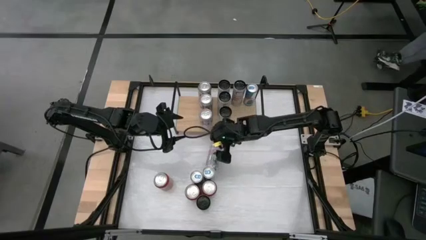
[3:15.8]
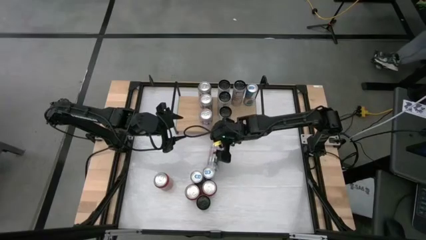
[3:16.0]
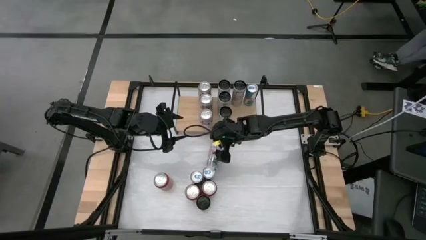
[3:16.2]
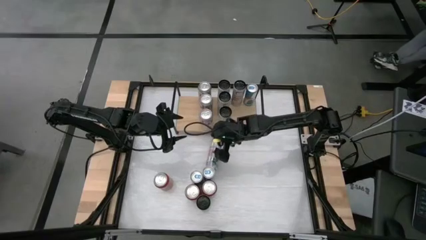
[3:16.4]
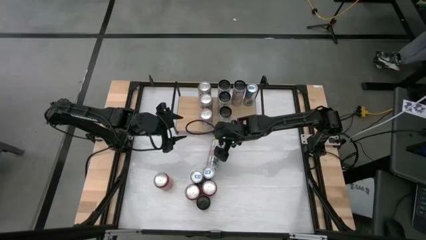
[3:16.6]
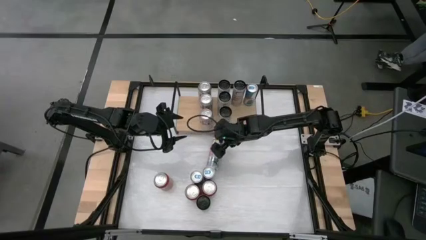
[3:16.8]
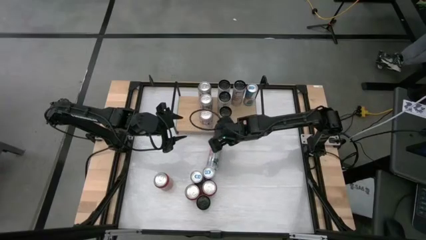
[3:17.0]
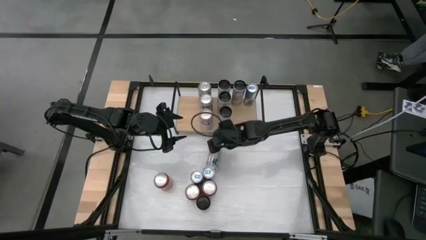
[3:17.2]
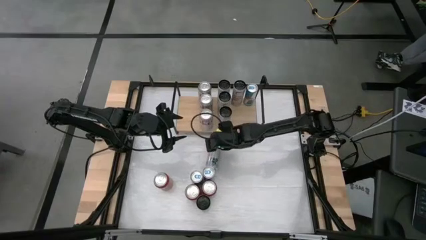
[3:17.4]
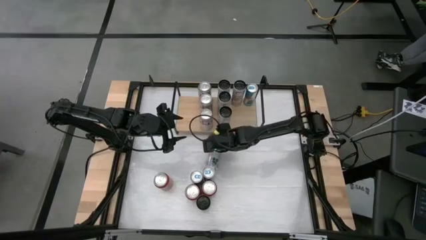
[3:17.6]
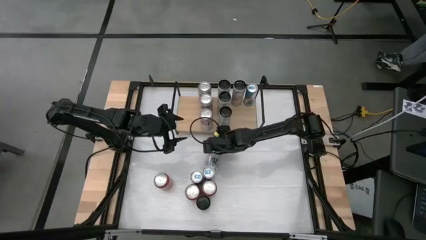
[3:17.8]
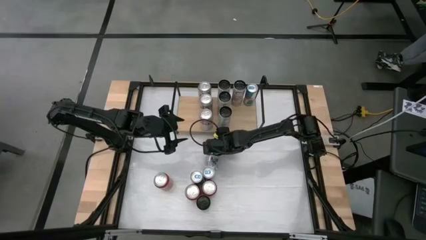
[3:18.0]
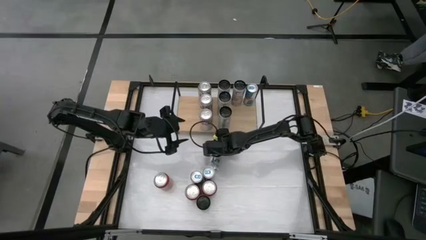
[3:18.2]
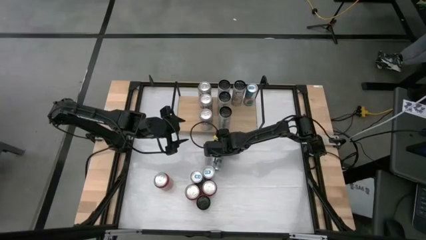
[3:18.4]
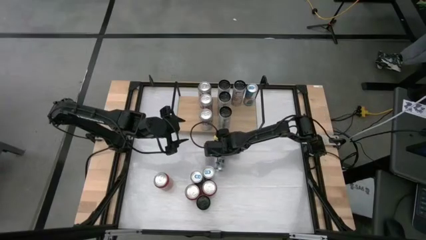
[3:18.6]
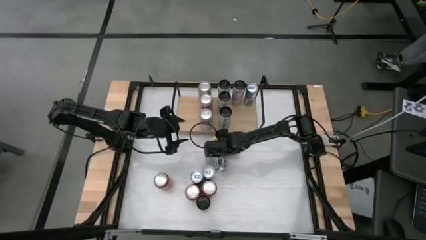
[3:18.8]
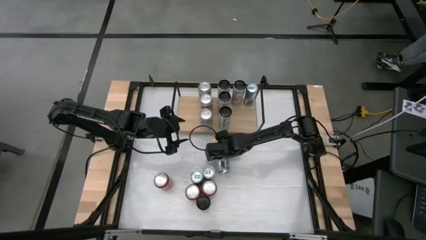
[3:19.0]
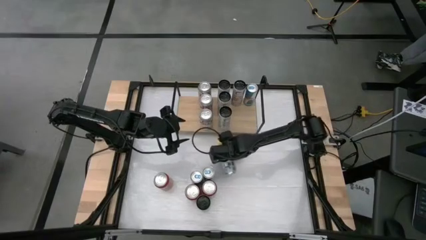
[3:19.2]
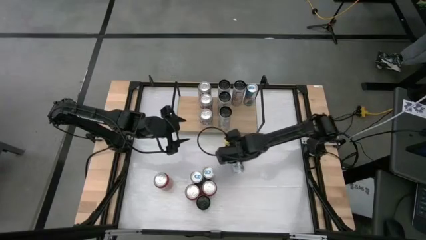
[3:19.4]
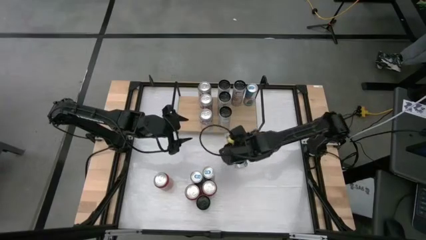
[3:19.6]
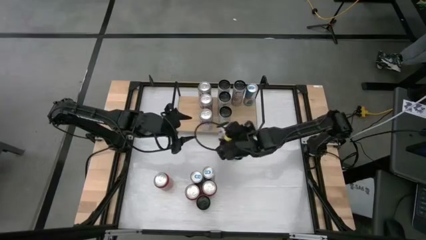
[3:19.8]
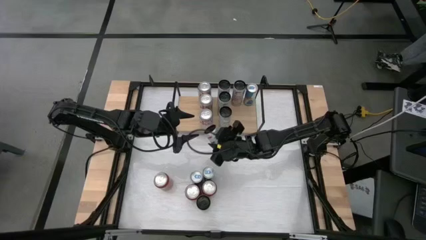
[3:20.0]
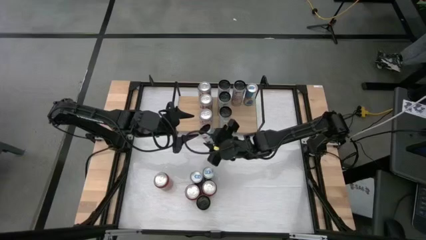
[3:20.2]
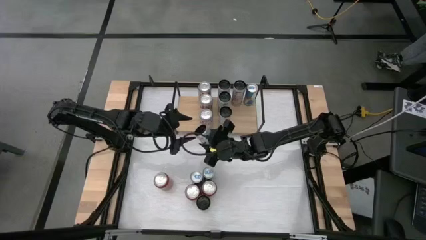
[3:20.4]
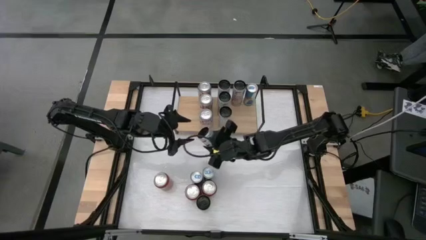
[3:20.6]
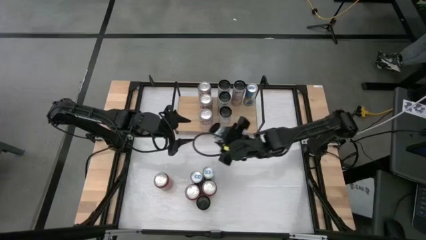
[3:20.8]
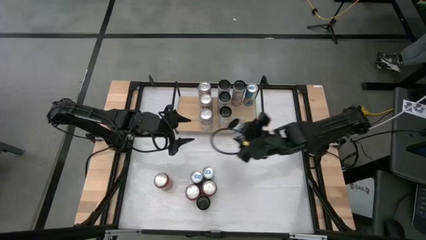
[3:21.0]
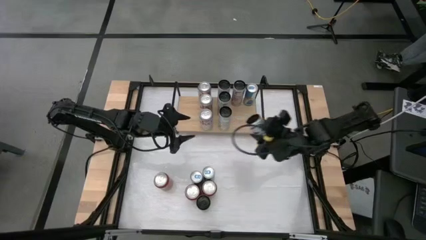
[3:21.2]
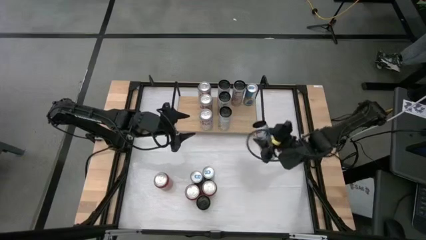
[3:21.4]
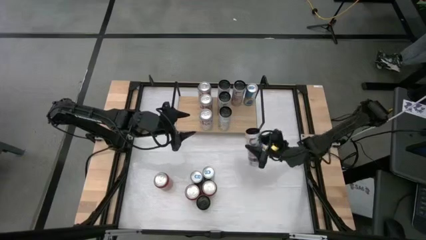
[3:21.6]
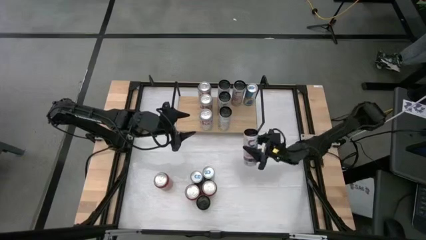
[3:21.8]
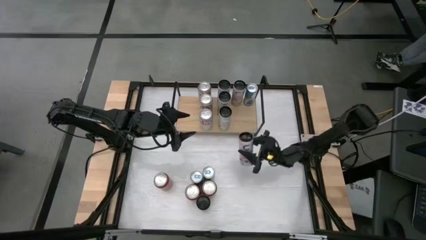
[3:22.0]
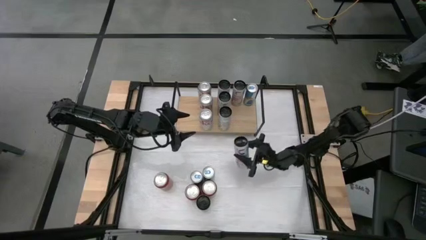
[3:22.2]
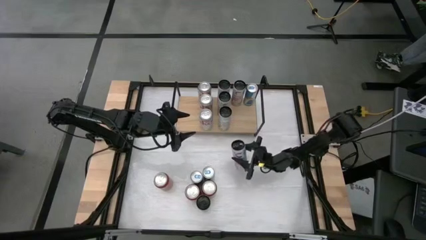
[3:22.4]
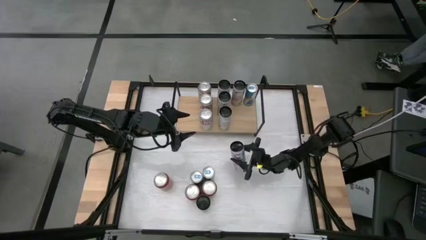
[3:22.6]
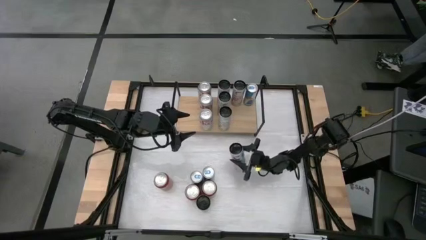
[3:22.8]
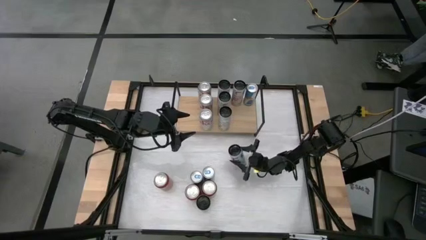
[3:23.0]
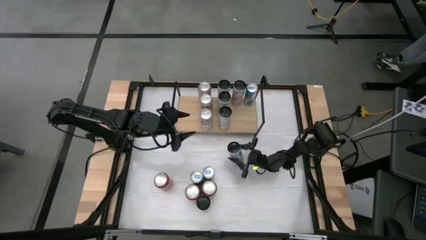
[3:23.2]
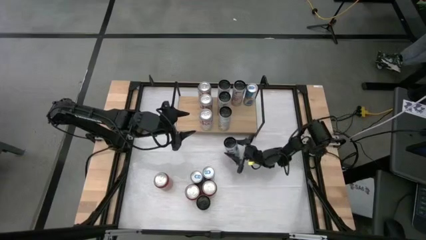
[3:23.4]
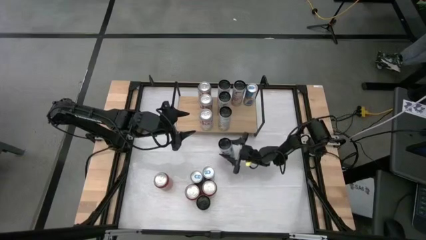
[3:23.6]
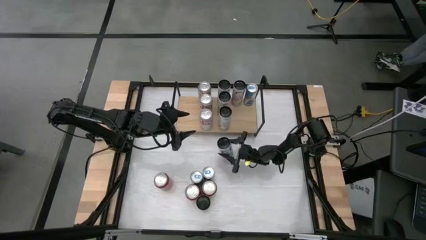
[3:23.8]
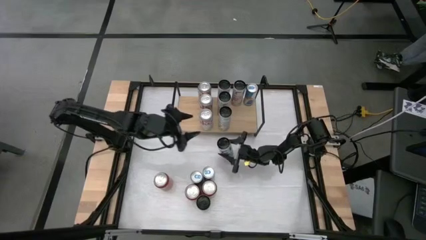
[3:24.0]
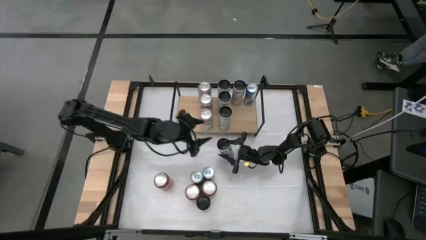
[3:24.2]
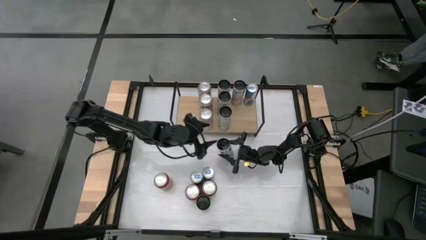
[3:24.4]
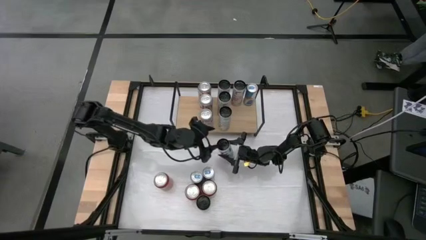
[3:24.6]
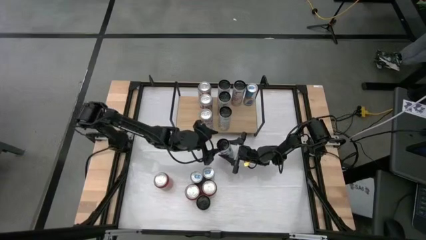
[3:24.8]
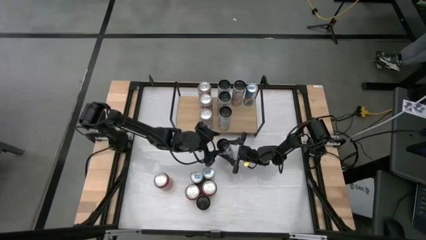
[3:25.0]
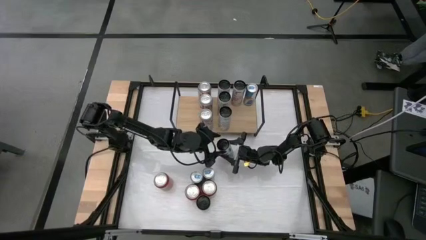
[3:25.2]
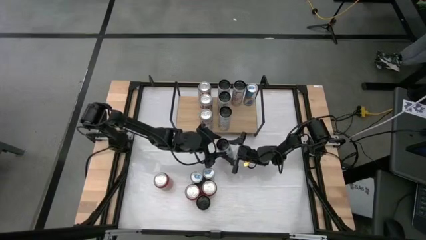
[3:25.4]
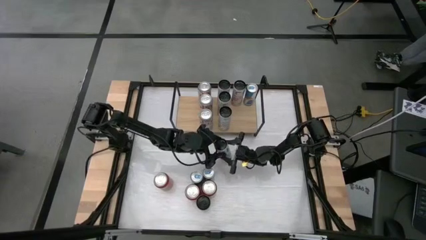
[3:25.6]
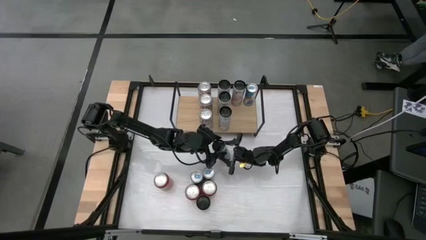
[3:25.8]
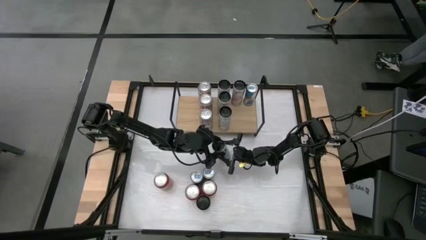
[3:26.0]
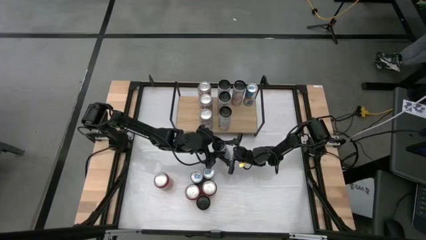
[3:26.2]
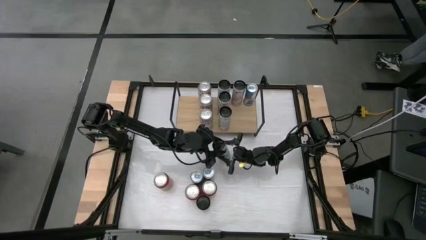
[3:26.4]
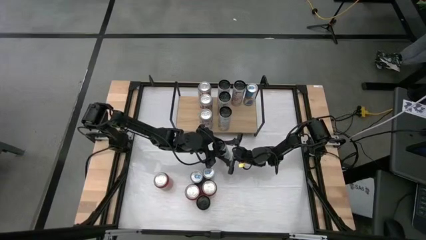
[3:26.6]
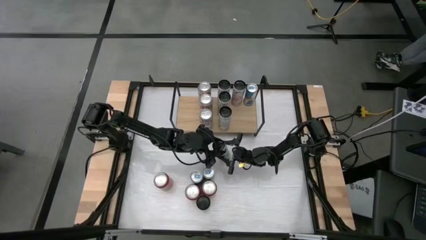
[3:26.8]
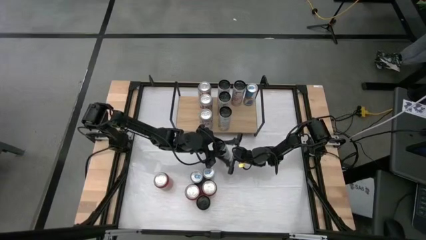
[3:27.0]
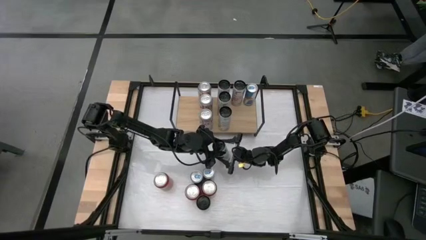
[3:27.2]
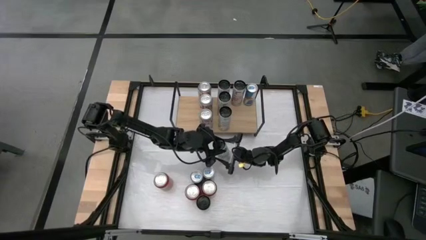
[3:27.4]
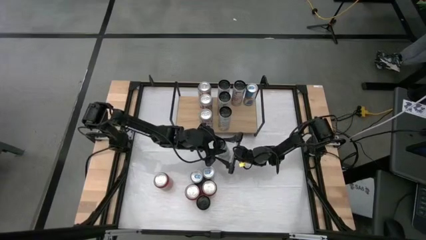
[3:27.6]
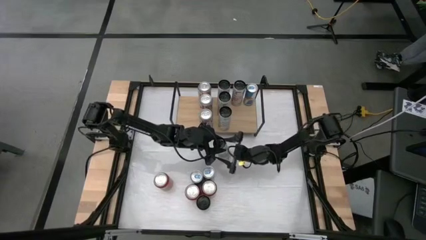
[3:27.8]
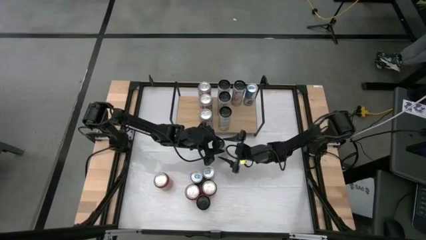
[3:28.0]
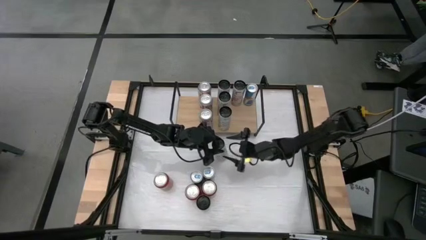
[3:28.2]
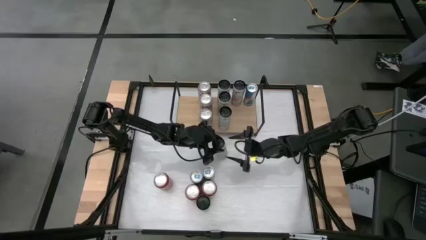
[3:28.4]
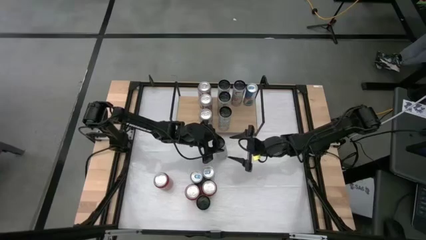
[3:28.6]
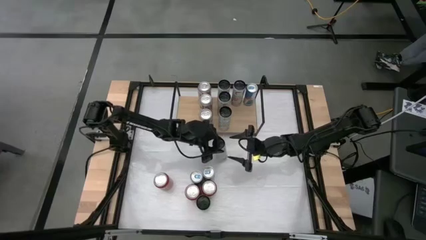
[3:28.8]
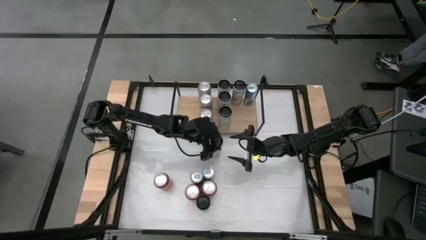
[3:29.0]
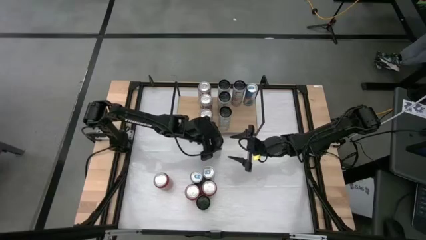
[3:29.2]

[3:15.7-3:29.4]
Task: Place canned beverage on shelf
Put the white pink soda can onto the shelf aligned with the other white pink soda cans

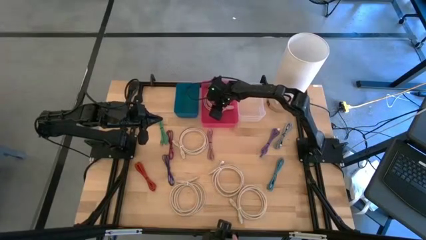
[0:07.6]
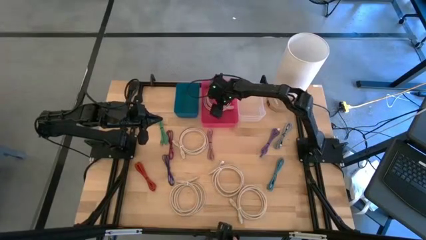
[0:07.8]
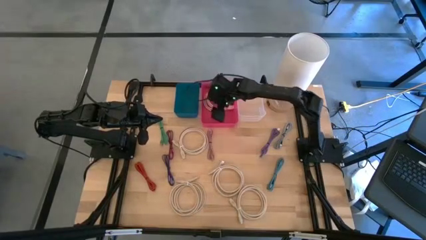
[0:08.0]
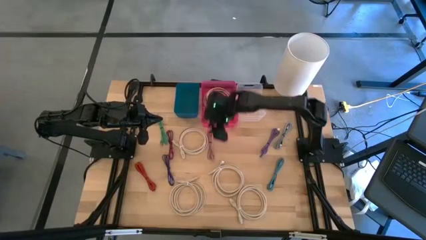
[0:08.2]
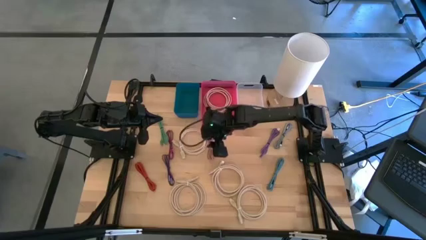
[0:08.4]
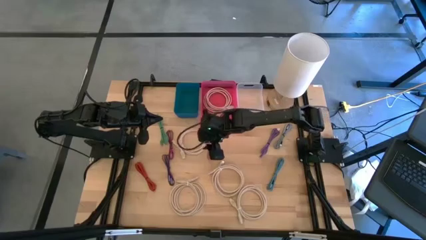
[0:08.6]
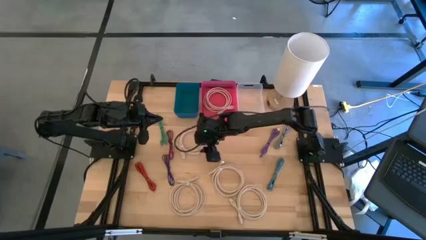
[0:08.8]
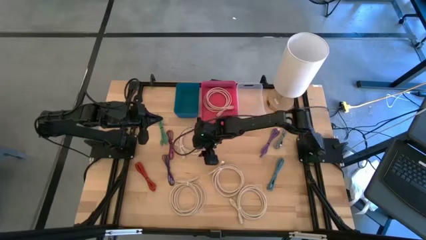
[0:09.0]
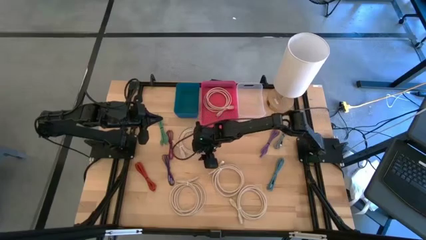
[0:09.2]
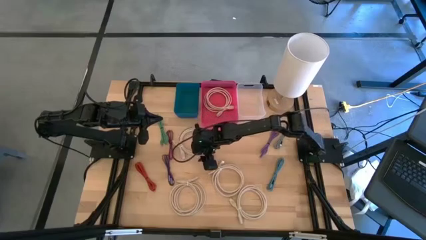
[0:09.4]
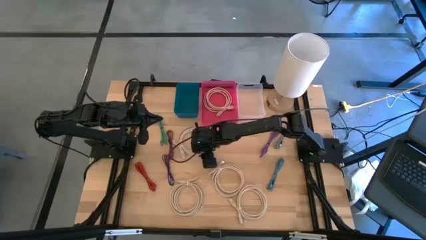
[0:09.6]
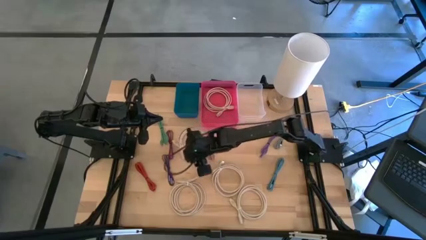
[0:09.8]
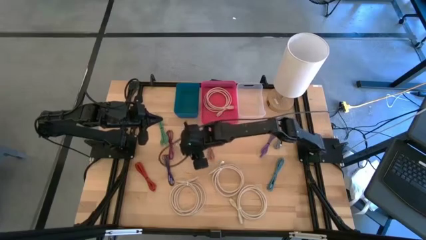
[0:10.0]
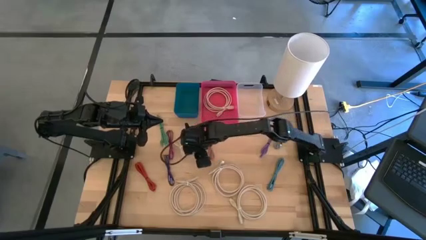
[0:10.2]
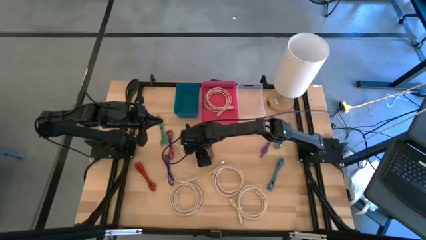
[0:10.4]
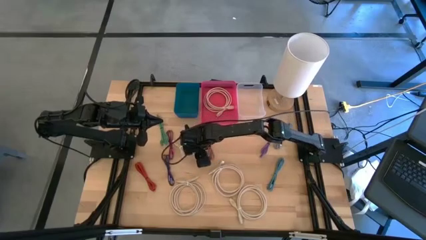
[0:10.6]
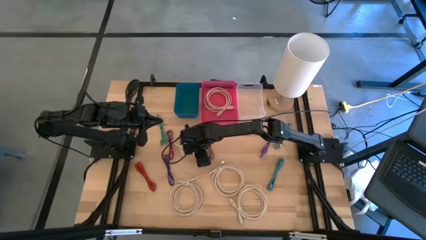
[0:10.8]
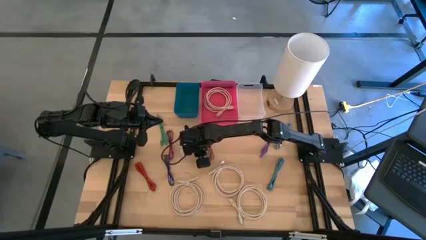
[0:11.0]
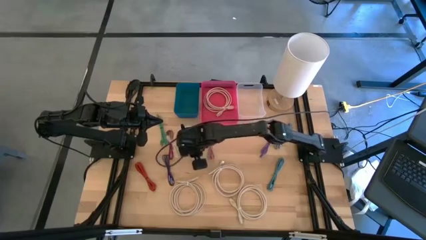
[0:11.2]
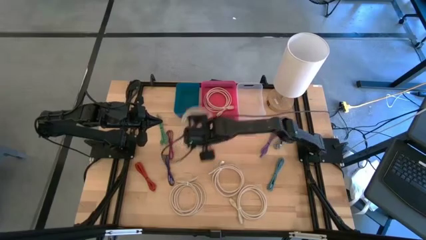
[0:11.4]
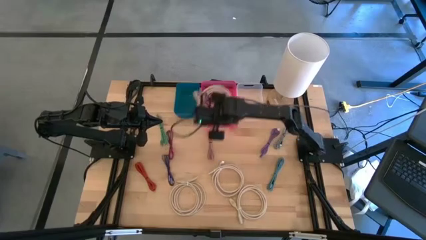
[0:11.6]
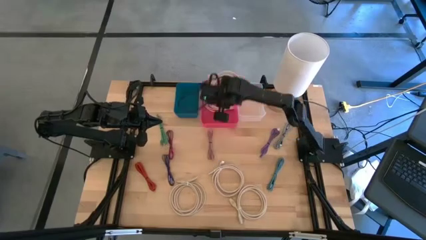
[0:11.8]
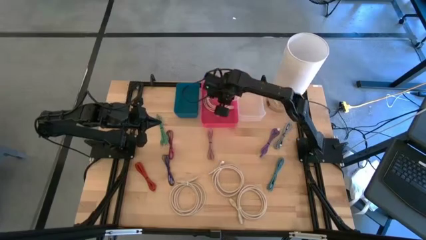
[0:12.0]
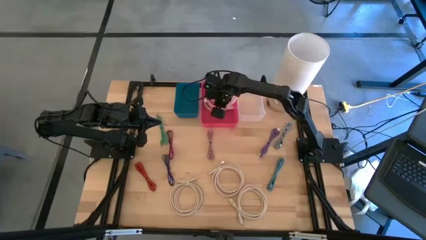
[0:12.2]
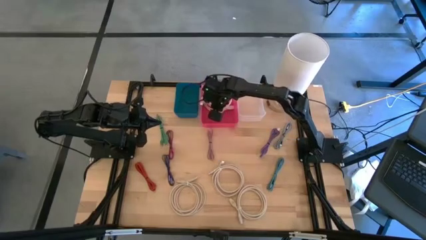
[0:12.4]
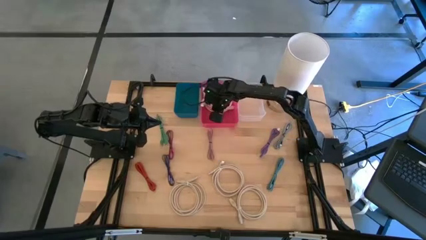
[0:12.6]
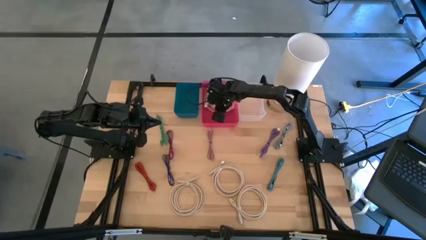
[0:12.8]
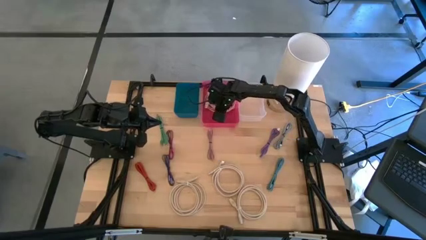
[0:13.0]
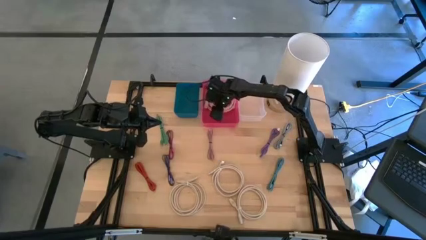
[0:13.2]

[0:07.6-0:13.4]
Task: Pick & Place USB Port
Put the light brown HDMI cable into the pink bin
